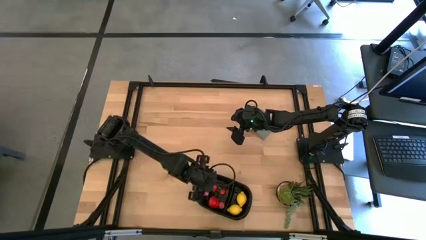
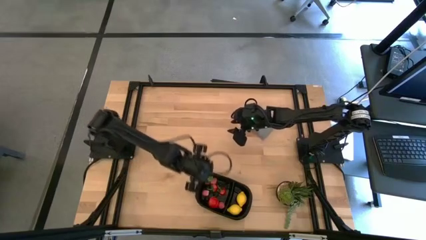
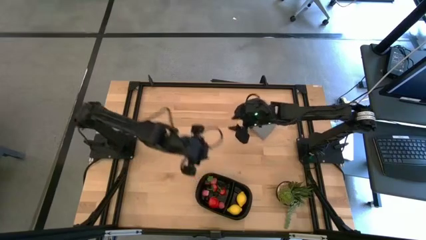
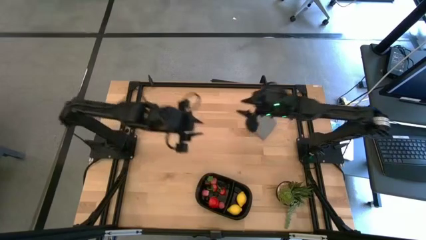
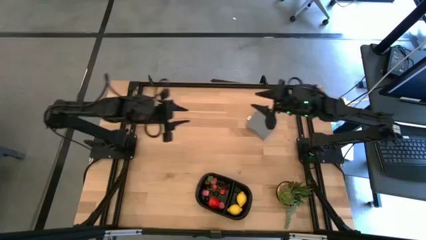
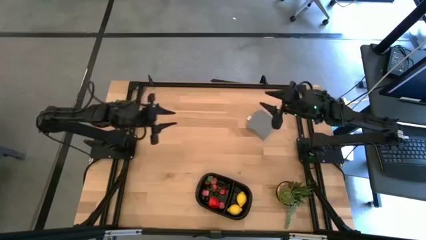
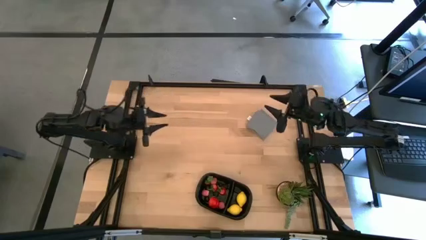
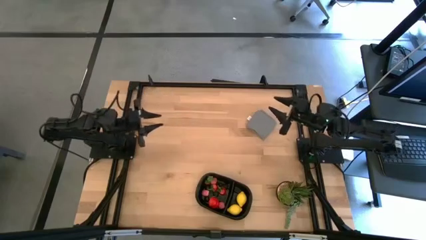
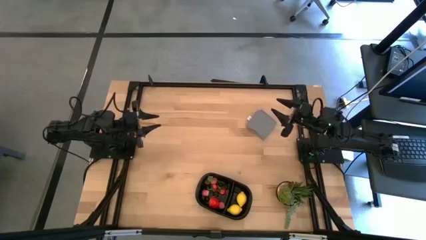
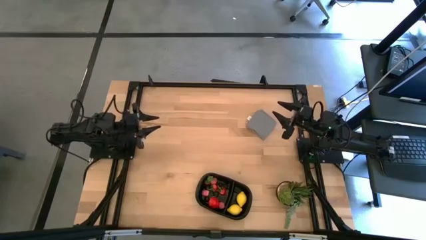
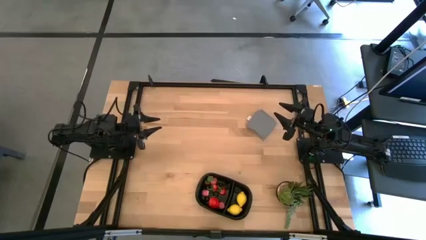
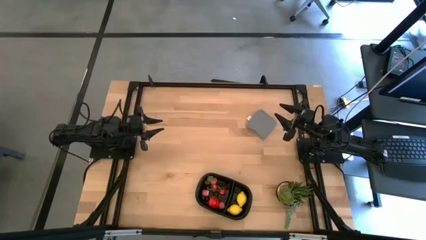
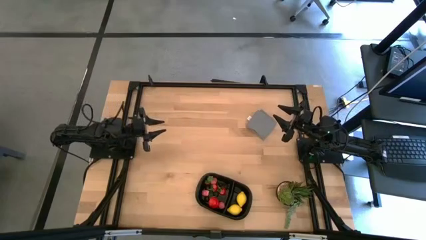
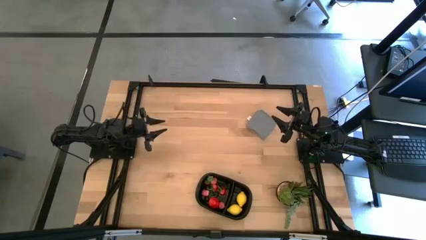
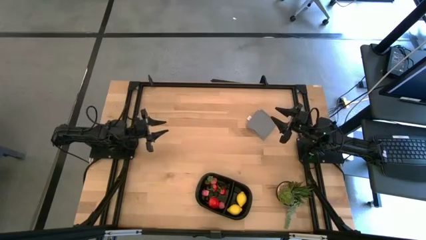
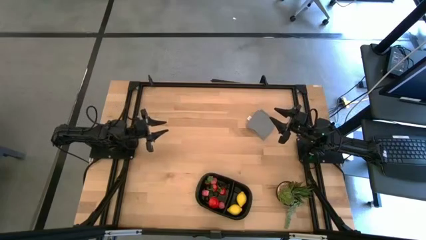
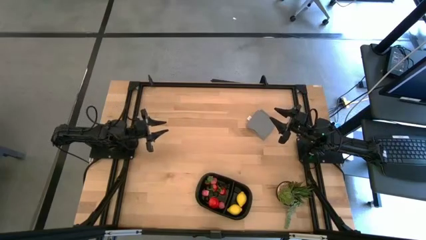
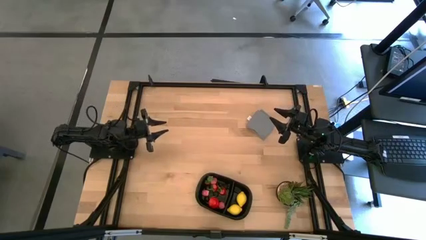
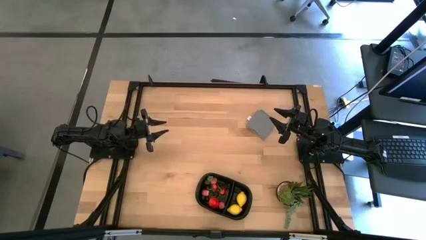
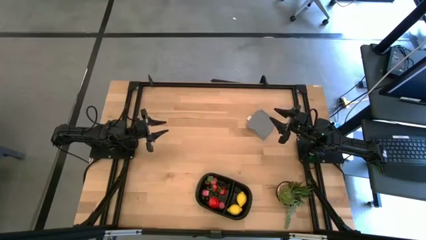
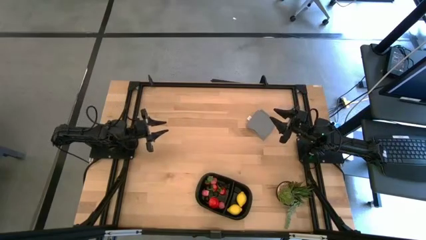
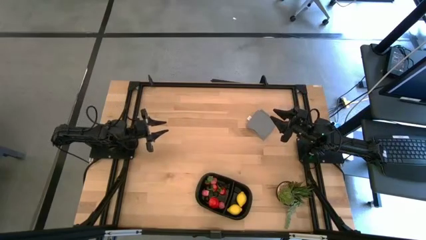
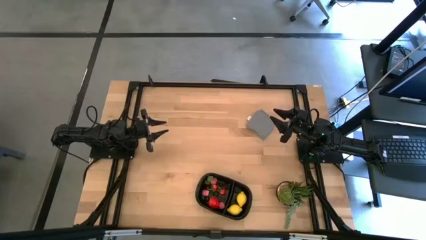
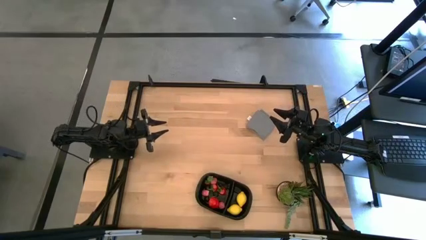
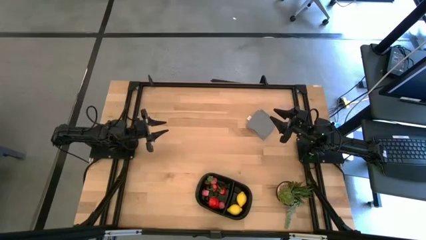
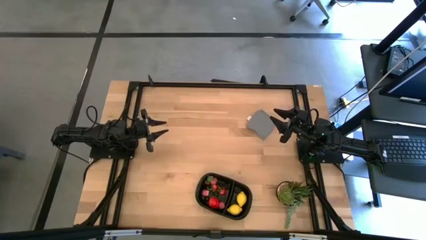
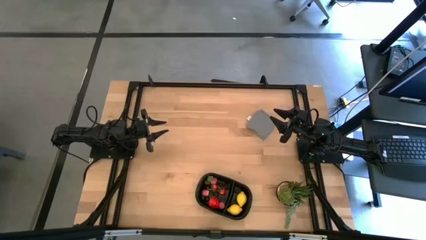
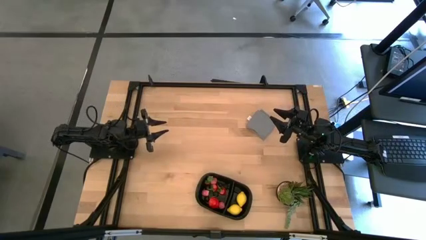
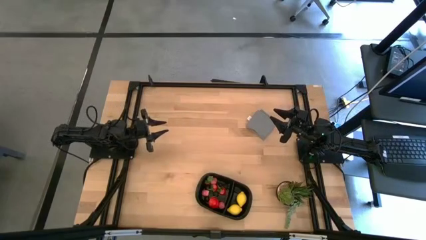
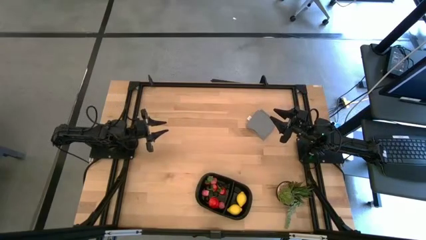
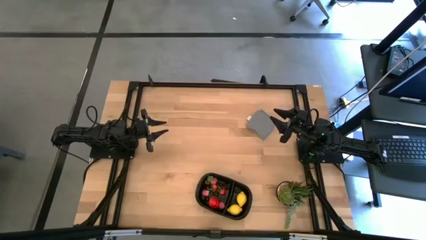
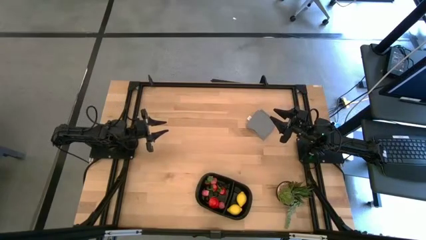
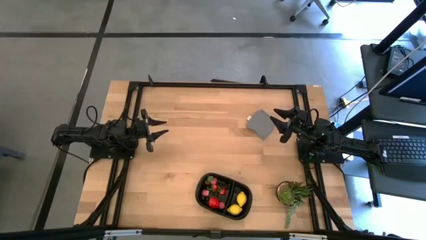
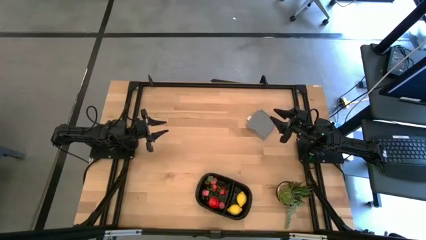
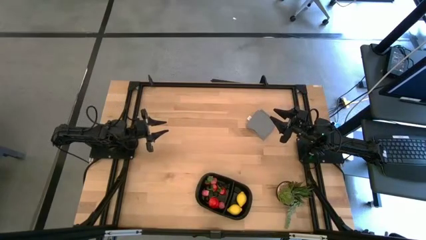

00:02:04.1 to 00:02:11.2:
Task: Pick and placing Produce into tupperware
Return to Home Position

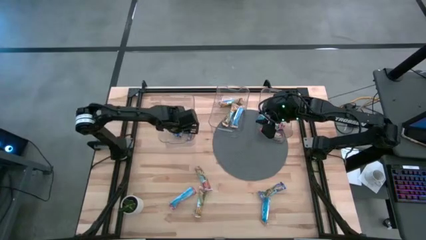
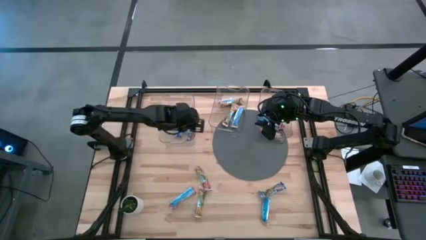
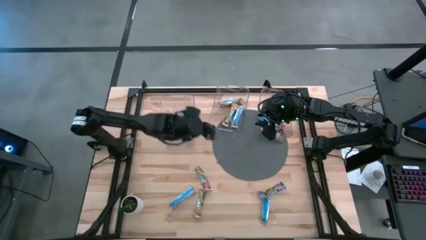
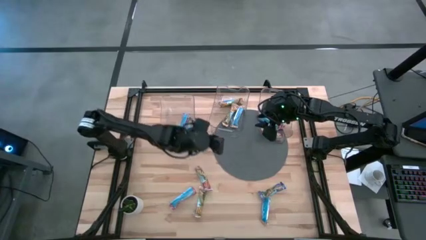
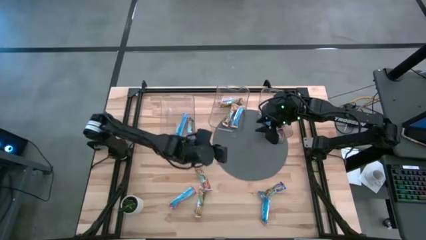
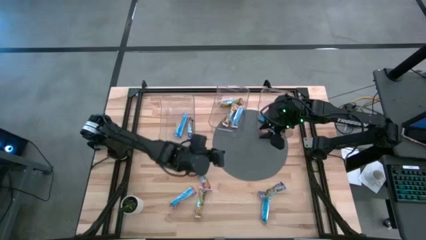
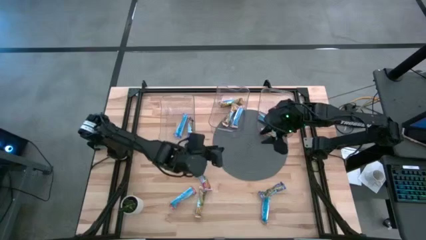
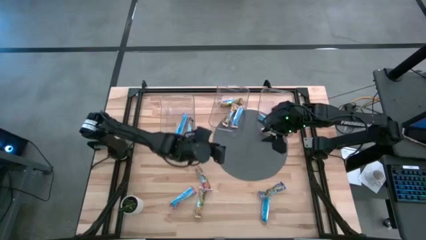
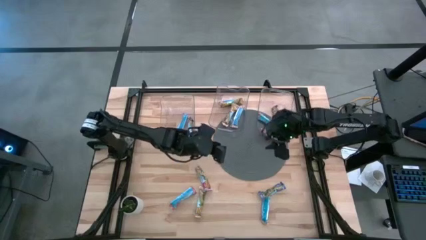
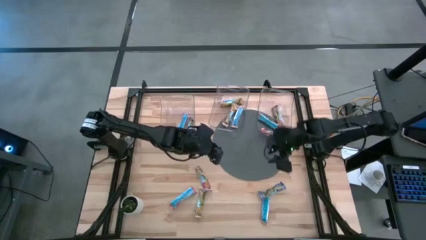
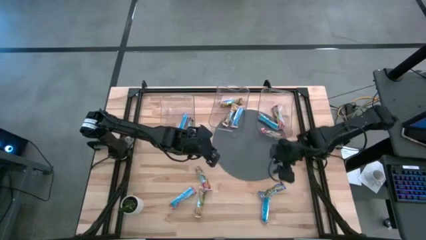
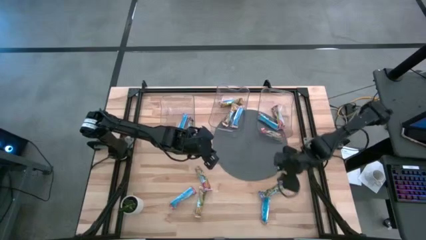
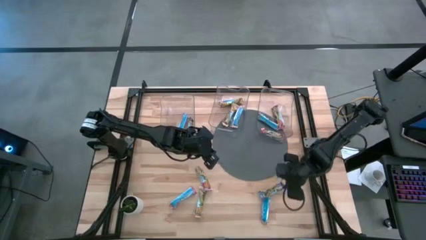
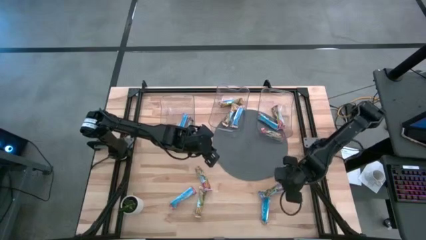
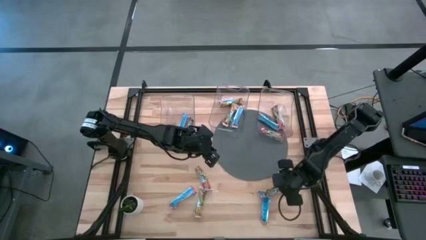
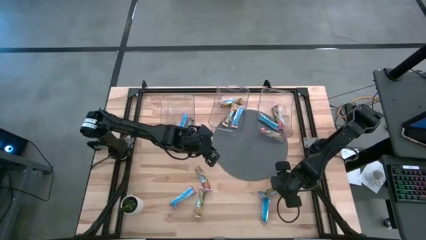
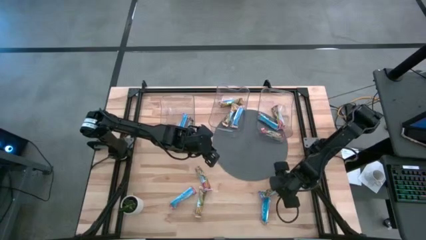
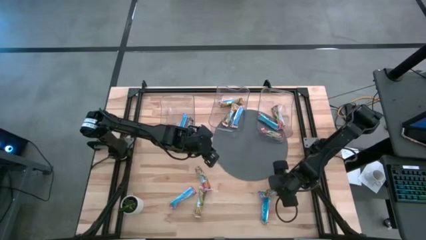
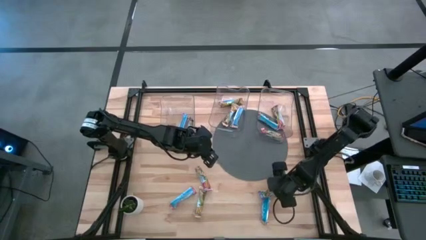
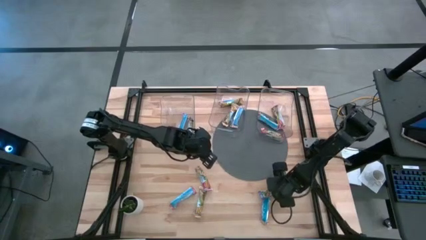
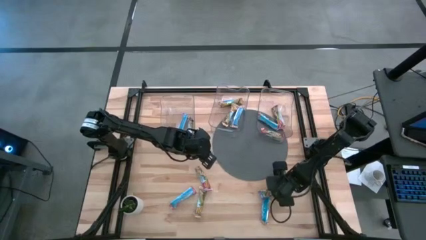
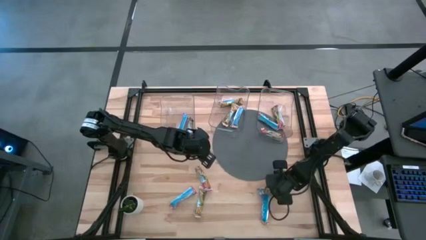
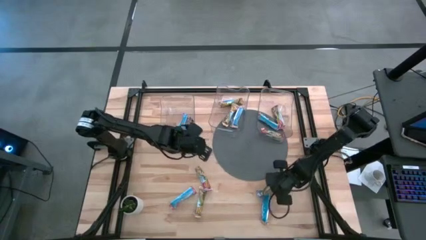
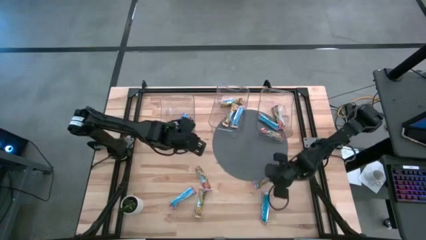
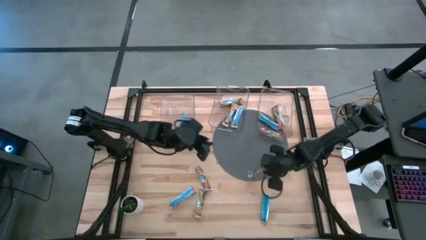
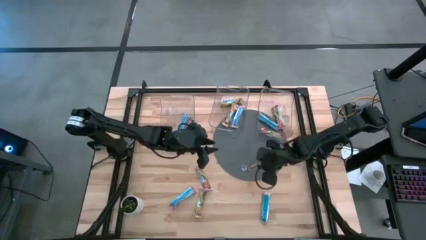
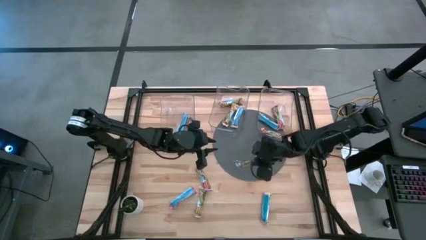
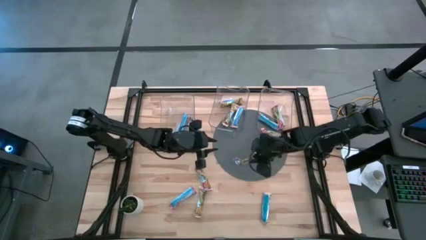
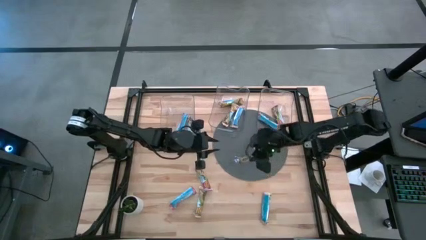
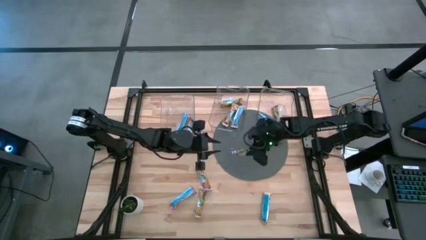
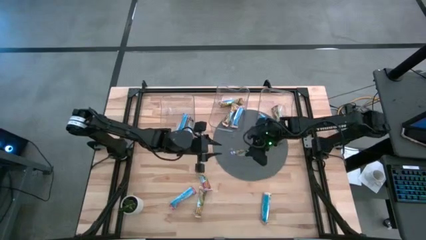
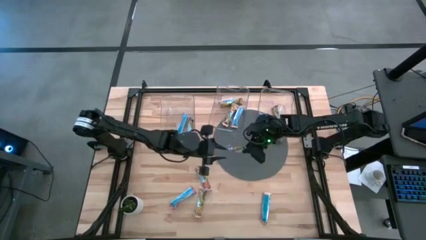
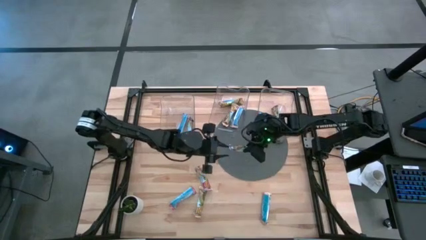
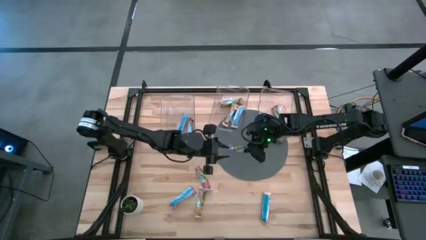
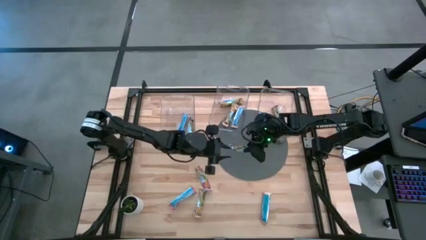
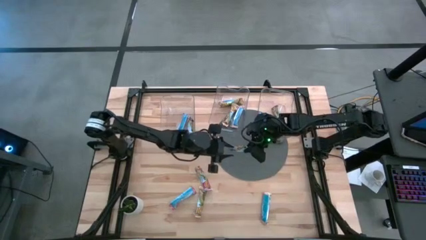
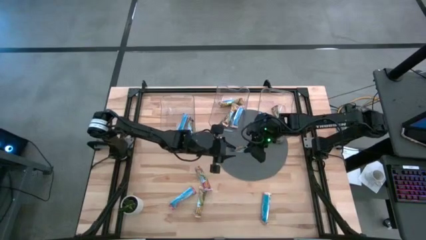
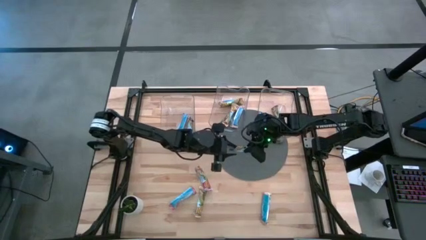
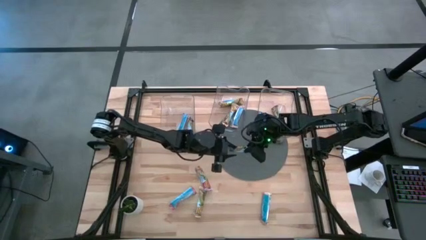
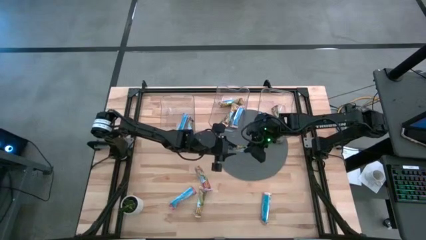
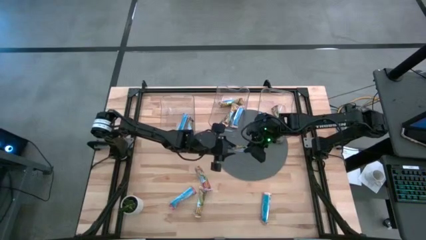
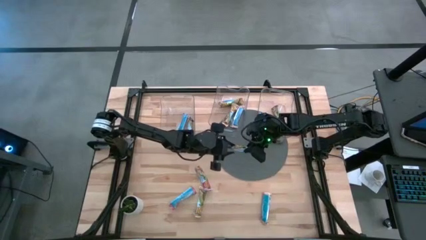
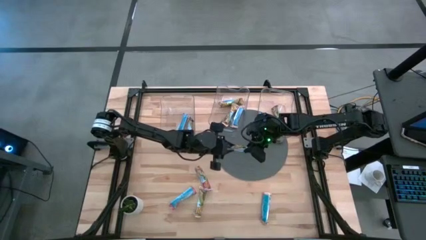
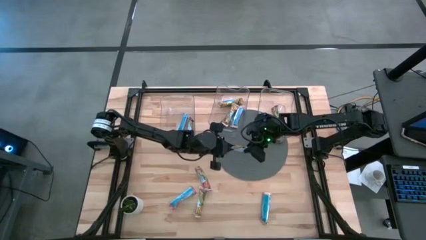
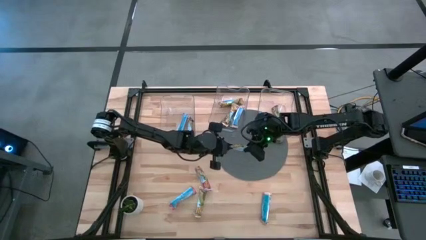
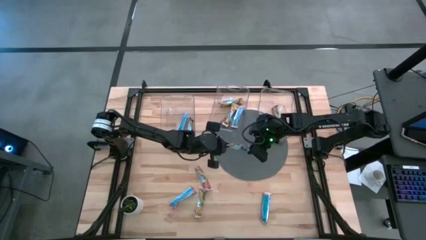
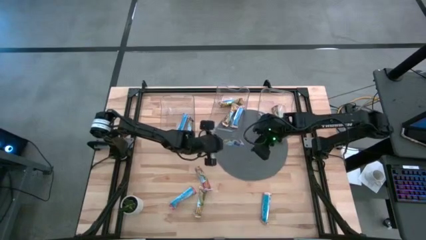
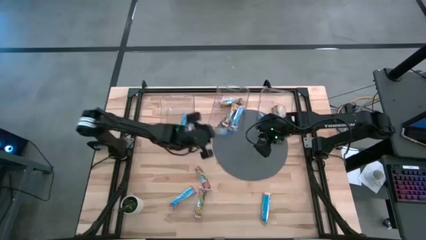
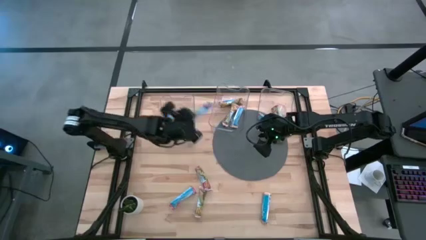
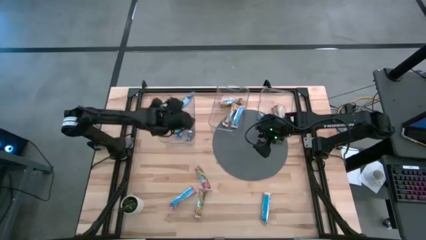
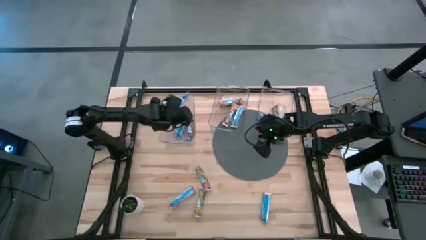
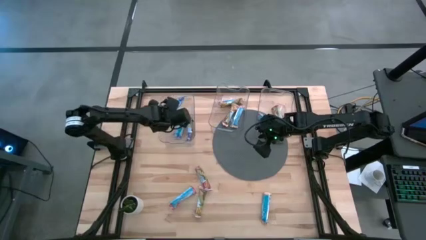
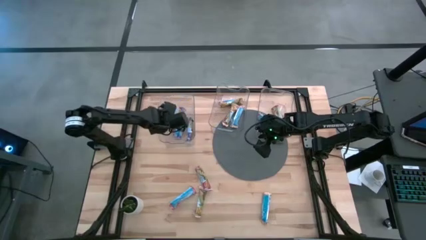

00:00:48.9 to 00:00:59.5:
Task: Pick and place Granola Bars by type
Put the blue granola bar into the left transparent bin
